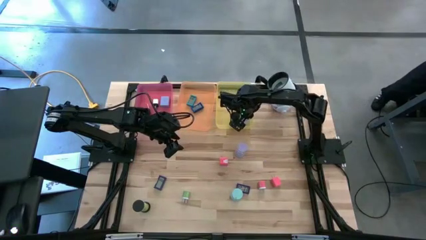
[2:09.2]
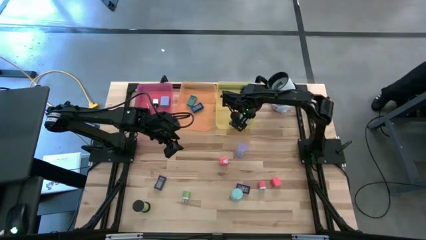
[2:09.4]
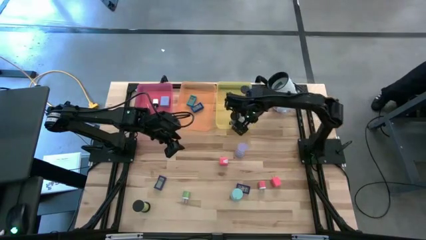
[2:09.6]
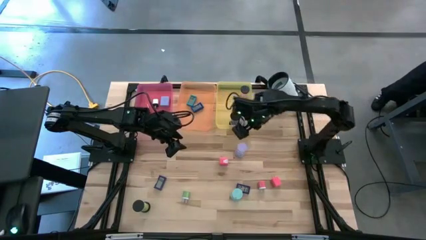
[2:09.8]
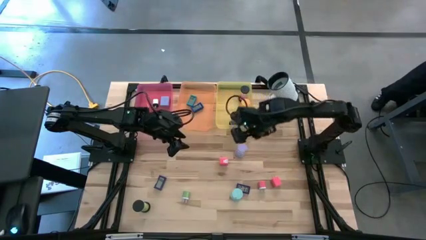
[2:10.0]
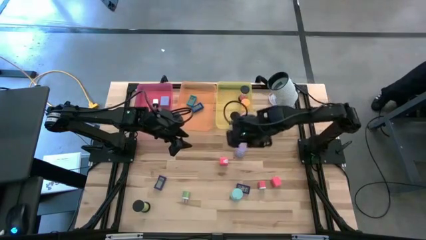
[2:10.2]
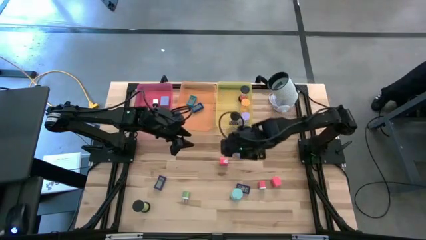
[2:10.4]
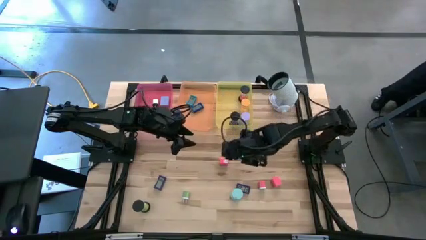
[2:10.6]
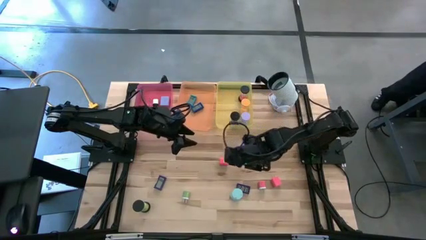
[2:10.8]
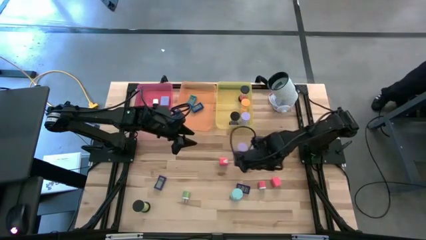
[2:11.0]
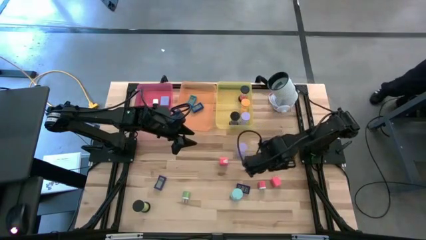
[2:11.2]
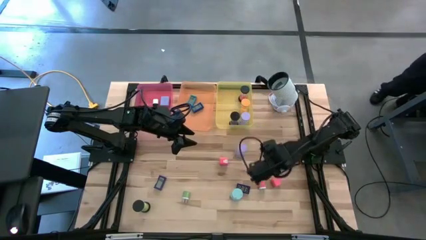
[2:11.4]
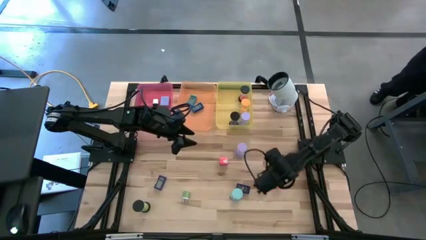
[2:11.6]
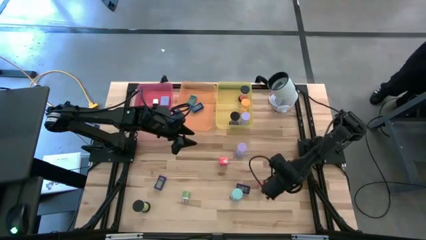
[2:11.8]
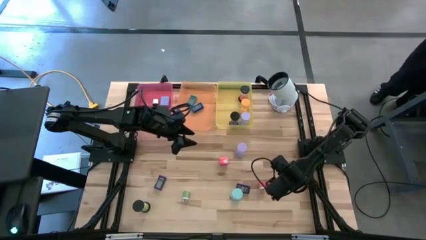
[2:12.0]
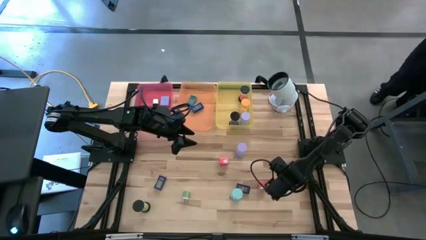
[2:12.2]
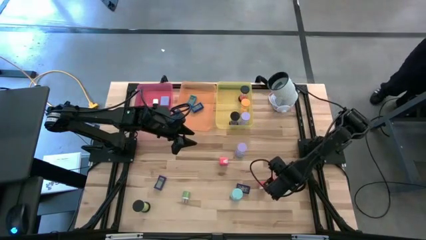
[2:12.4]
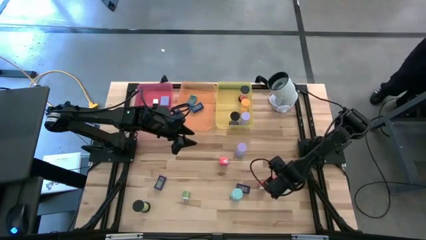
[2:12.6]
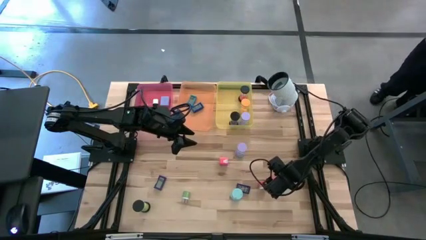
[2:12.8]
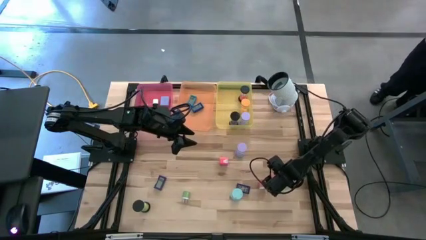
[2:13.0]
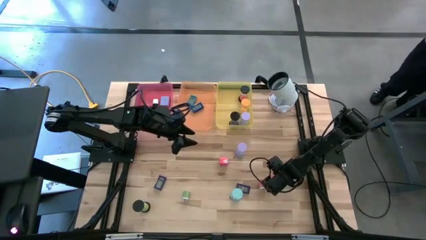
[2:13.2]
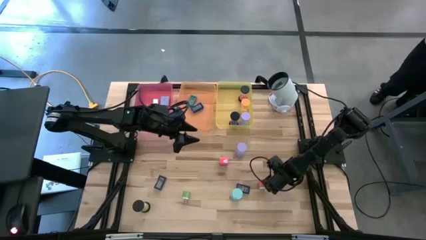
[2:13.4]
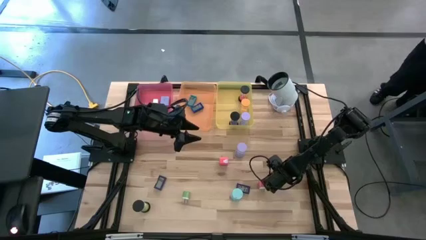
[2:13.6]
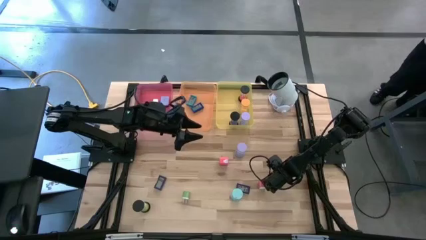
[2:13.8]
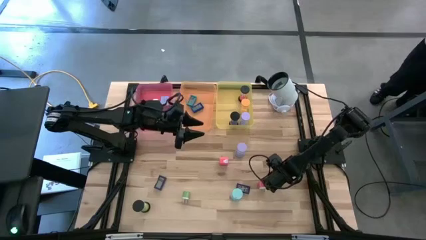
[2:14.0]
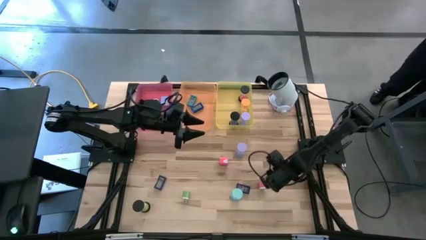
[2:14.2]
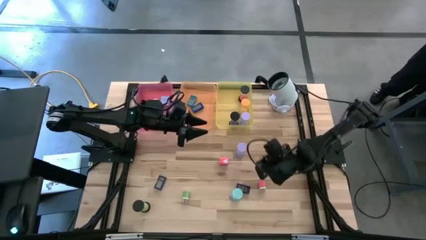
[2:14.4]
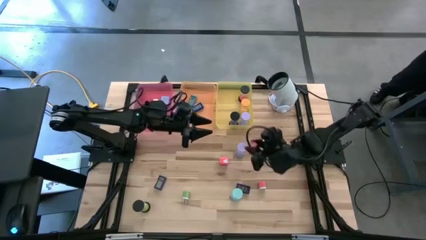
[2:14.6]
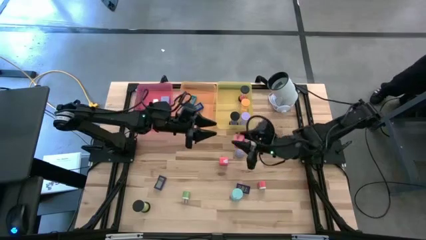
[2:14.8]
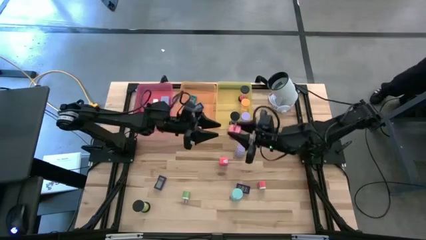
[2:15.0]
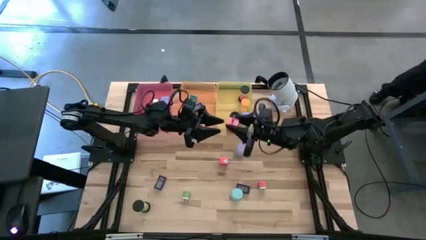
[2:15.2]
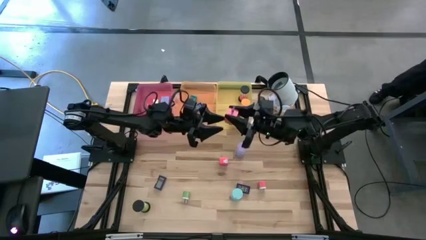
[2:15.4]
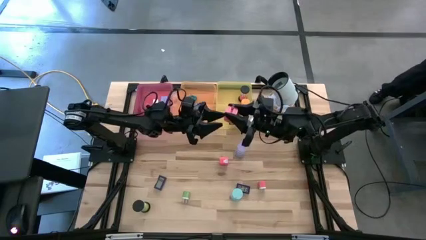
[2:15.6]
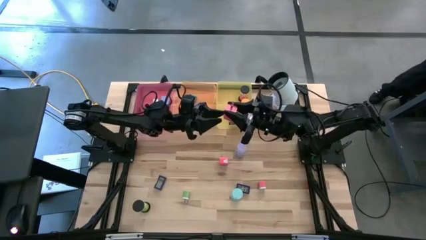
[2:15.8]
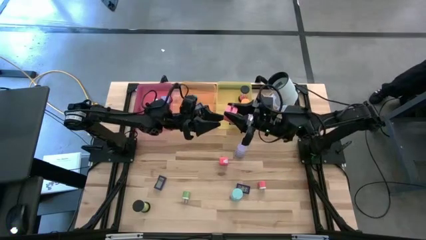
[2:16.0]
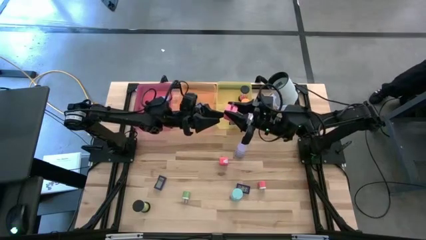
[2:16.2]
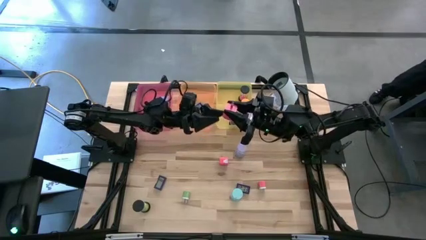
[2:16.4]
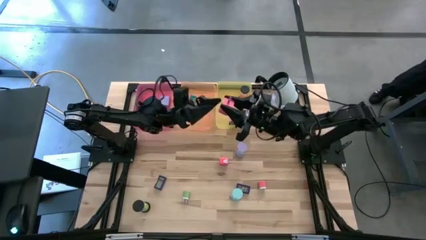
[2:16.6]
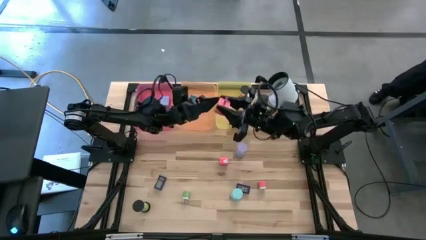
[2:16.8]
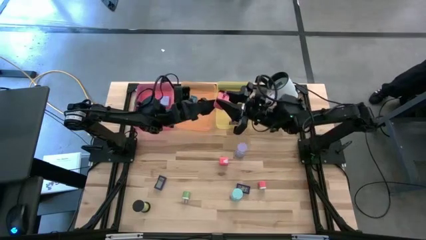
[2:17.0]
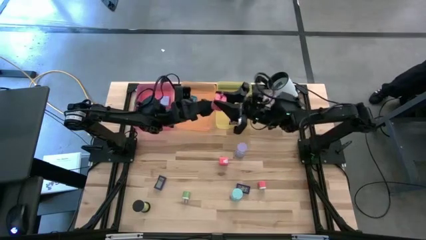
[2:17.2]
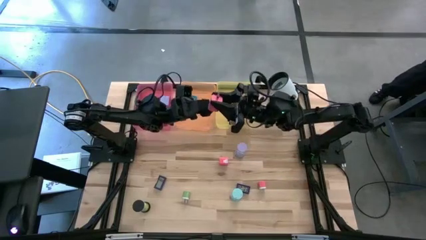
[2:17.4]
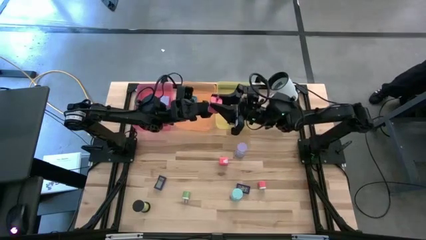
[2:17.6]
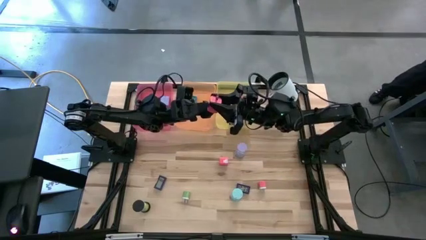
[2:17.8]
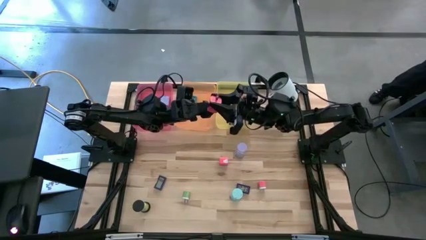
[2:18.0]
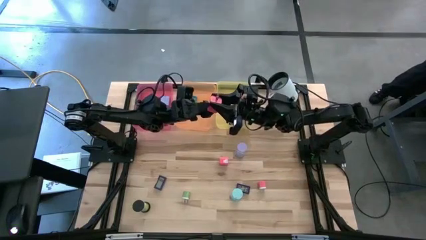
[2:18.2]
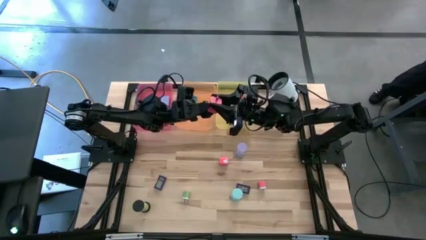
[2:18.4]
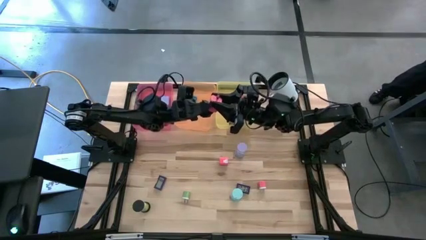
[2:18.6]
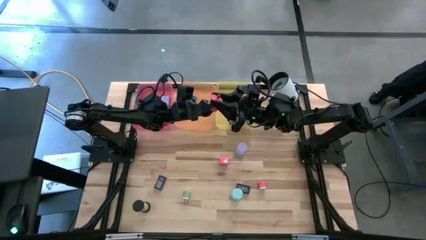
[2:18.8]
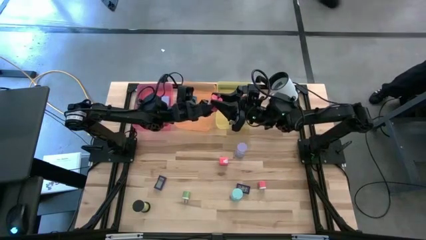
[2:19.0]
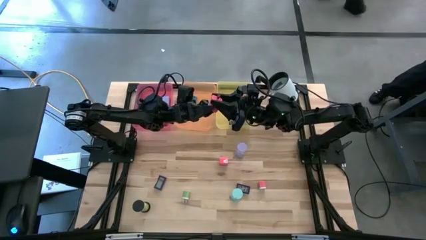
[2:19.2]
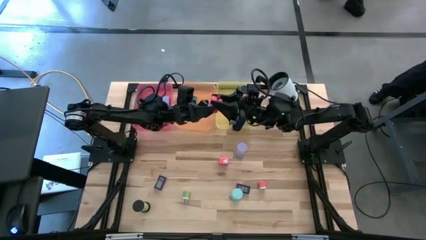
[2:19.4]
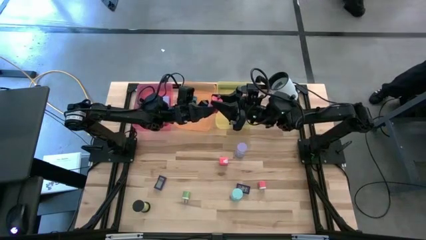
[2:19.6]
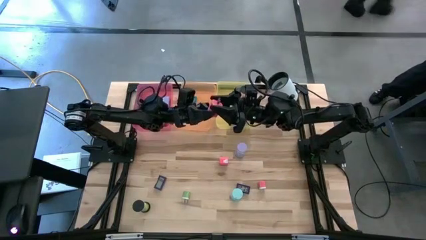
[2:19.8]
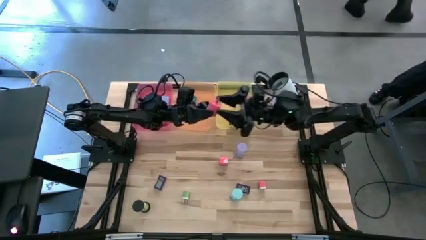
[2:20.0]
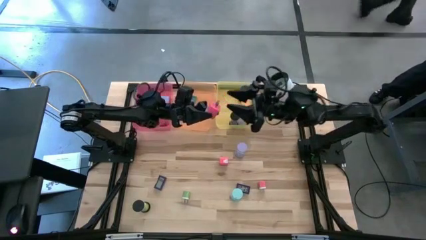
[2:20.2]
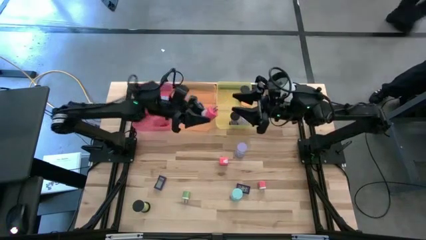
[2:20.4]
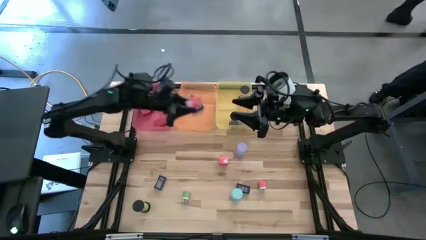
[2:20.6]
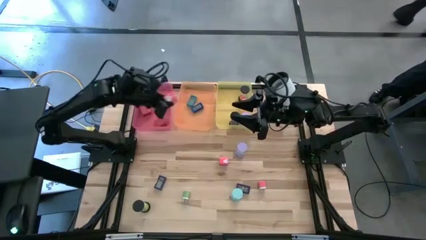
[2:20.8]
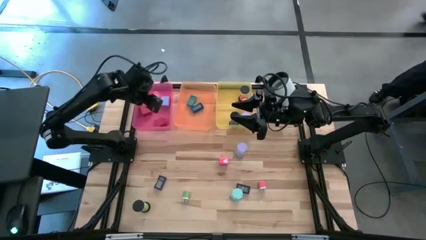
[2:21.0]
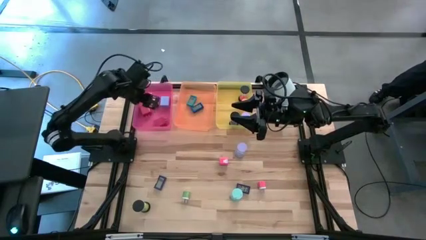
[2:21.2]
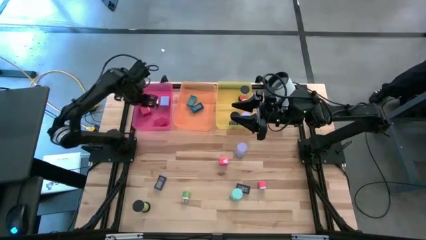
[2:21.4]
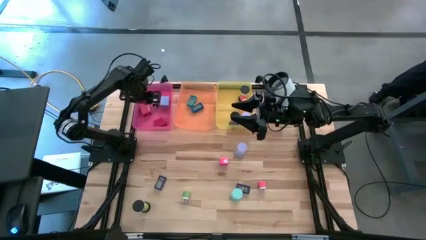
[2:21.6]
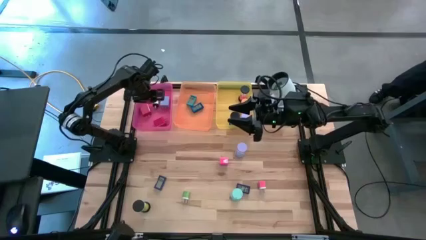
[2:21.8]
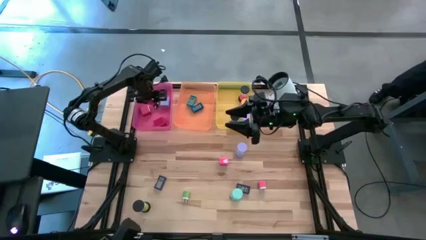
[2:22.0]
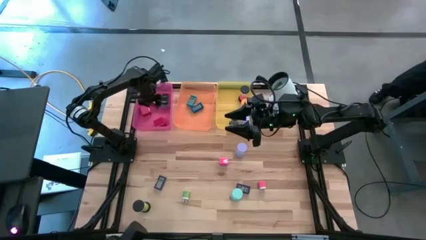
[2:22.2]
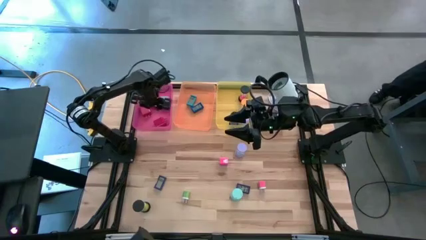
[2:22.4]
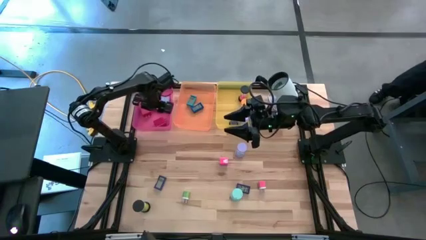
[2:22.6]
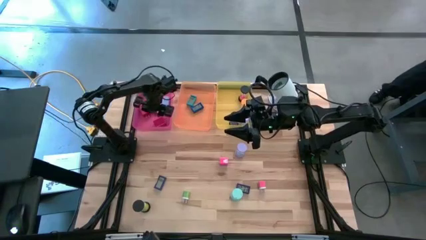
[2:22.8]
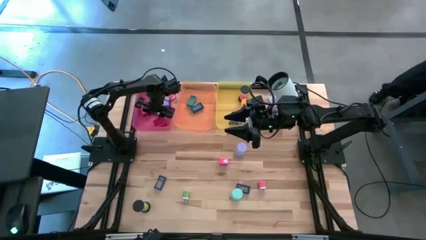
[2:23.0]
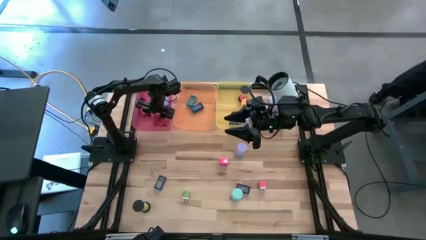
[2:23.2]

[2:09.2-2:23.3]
Task: Pick & Place Office items
Put the bottom pink charger adapter into the red bin

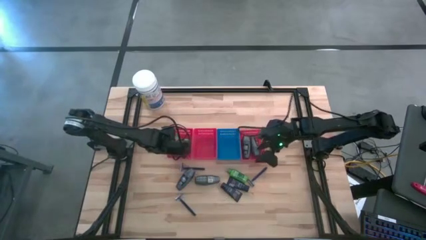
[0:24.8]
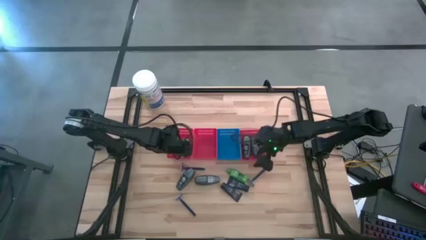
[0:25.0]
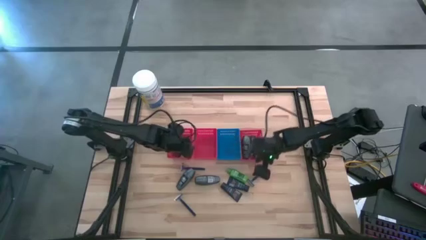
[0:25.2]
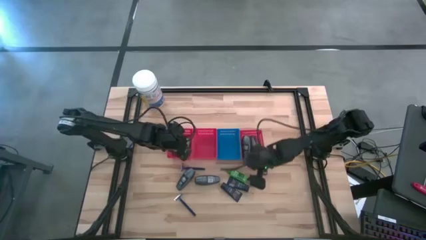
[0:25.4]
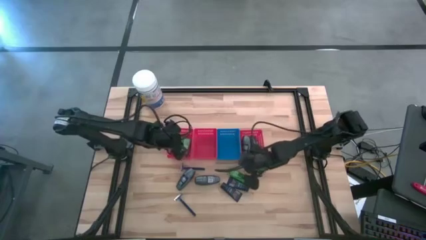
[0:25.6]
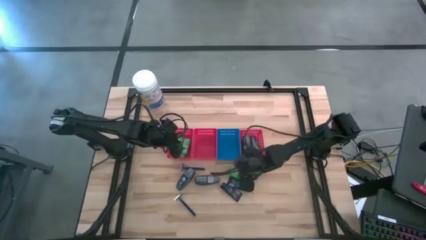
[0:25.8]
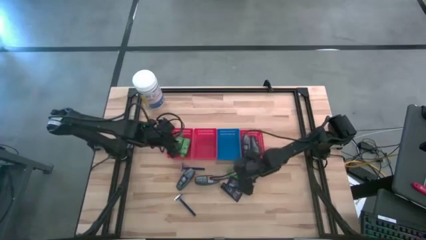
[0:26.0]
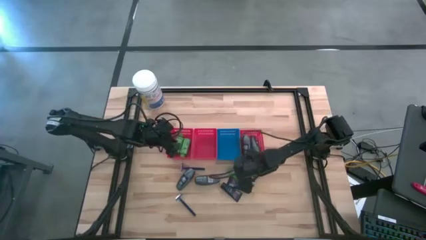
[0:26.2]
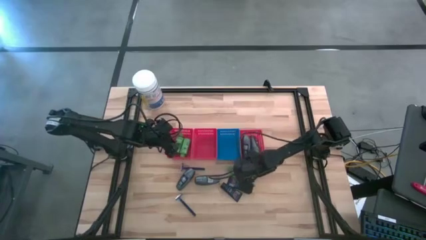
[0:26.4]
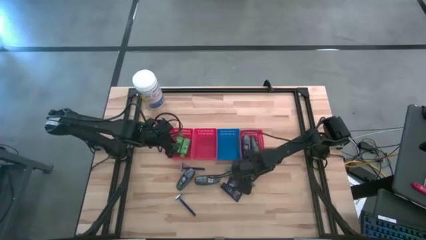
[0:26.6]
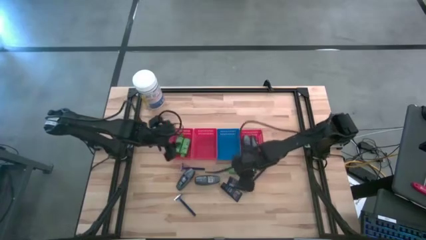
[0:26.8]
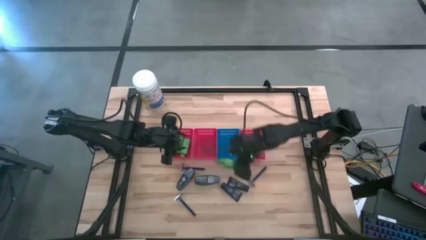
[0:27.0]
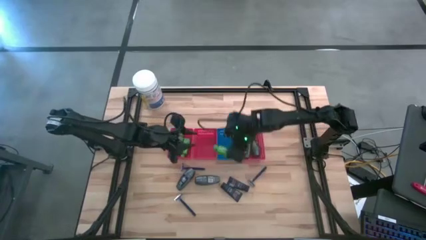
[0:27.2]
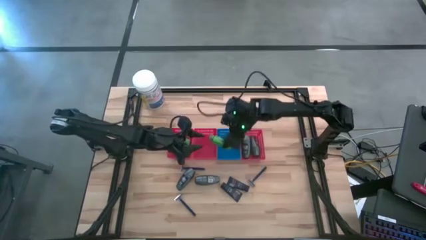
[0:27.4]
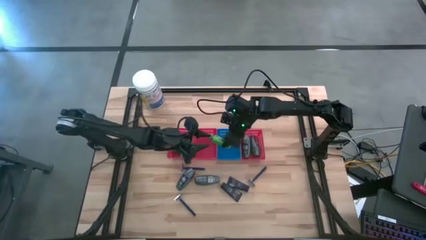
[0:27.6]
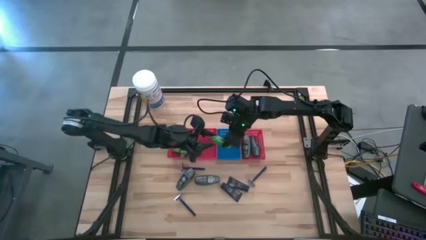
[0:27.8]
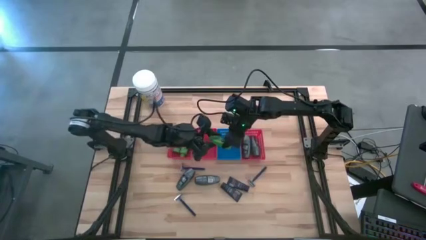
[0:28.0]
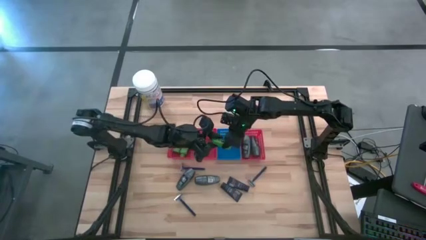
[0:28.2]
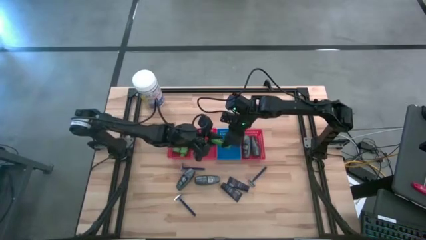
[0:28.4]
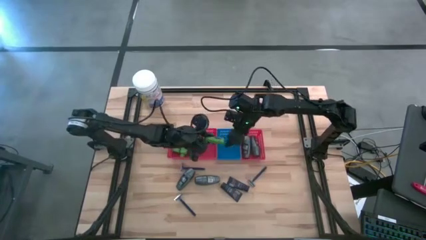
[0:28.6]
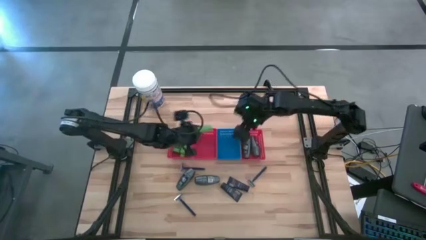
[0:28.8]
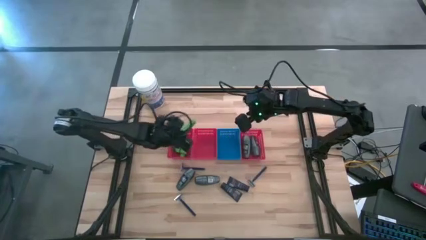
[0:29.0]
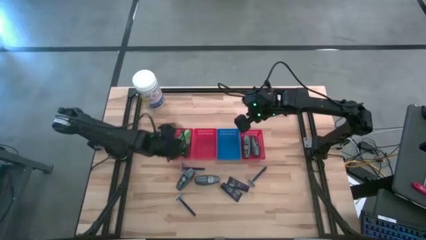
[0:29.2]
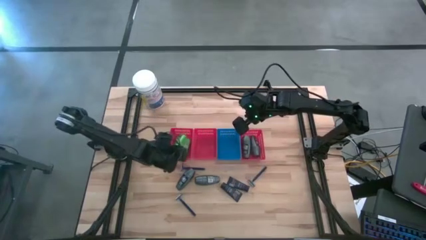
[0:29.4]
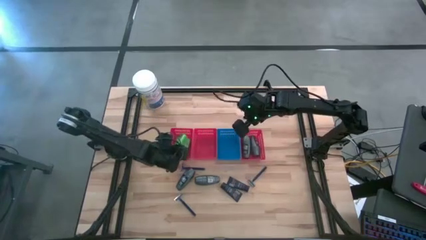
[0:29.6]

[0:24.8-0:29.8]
Task: Pick & Place Travel size toiletries
Put the green shampoo into the left red bin
